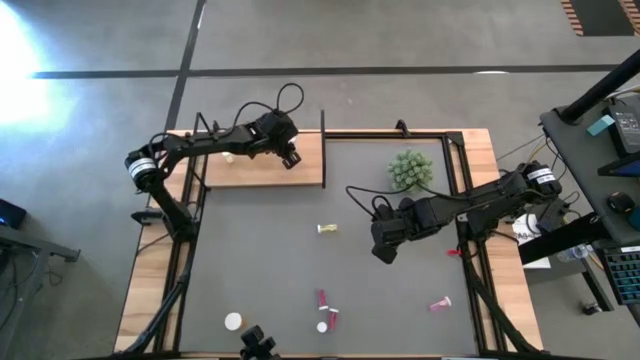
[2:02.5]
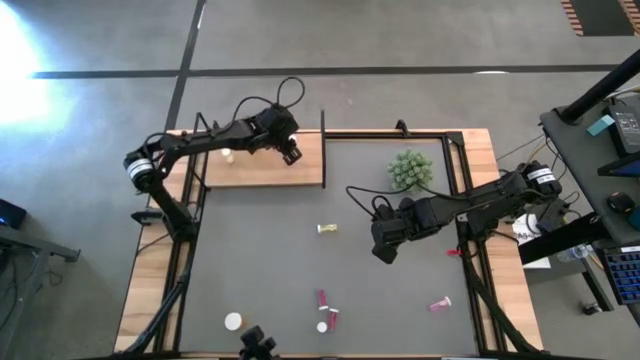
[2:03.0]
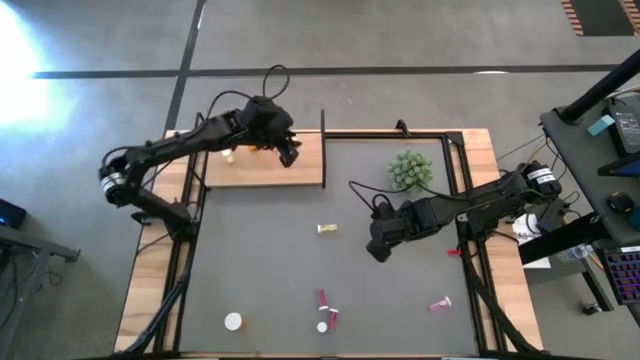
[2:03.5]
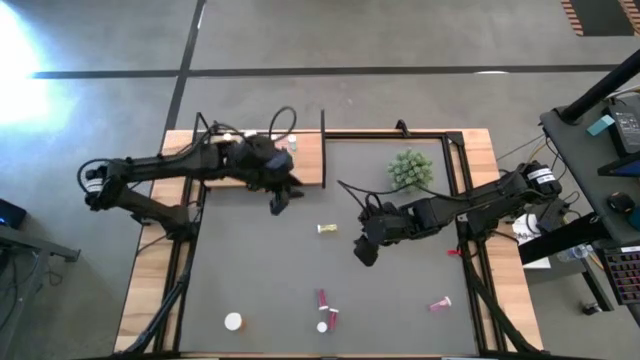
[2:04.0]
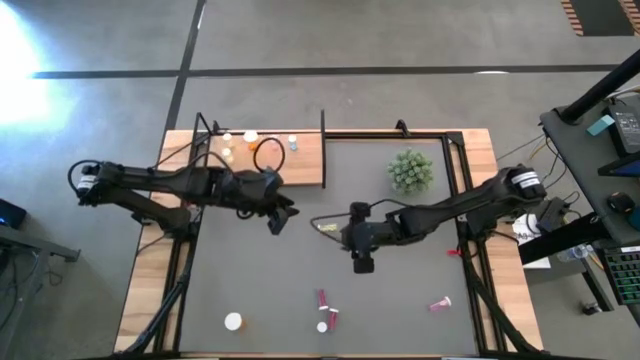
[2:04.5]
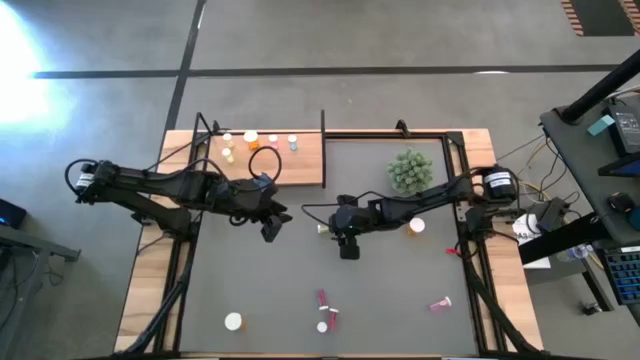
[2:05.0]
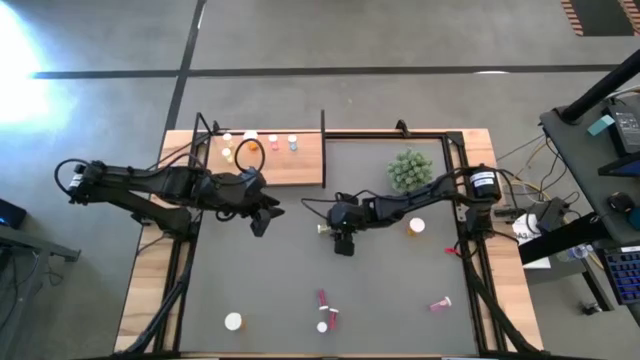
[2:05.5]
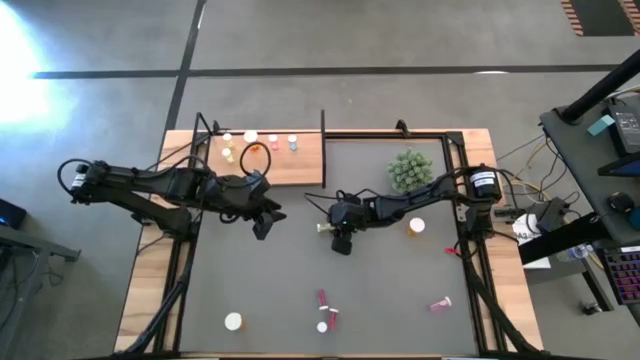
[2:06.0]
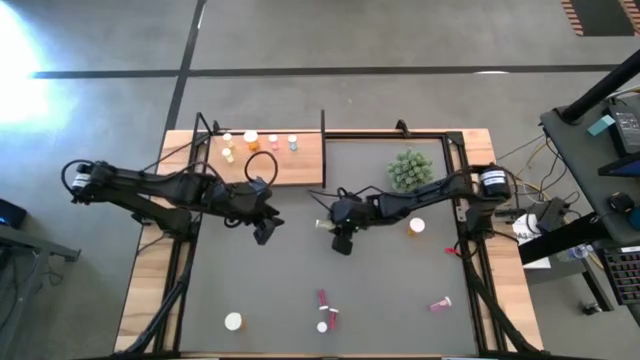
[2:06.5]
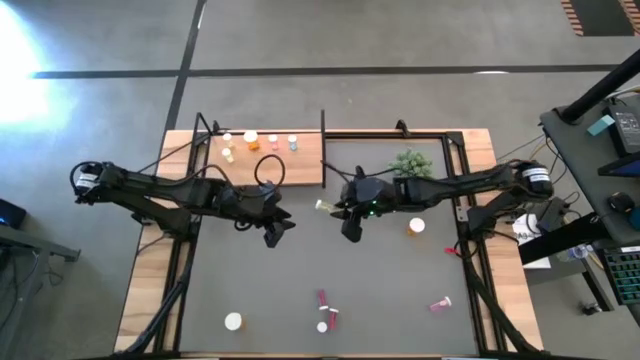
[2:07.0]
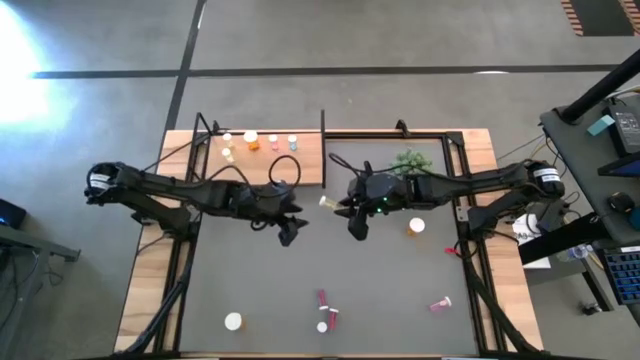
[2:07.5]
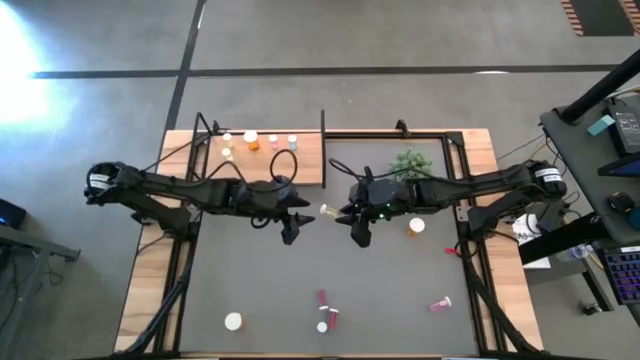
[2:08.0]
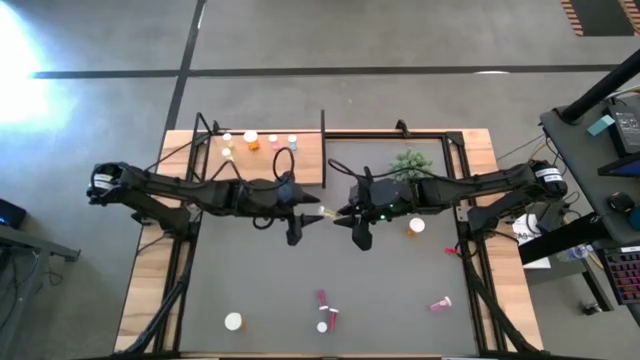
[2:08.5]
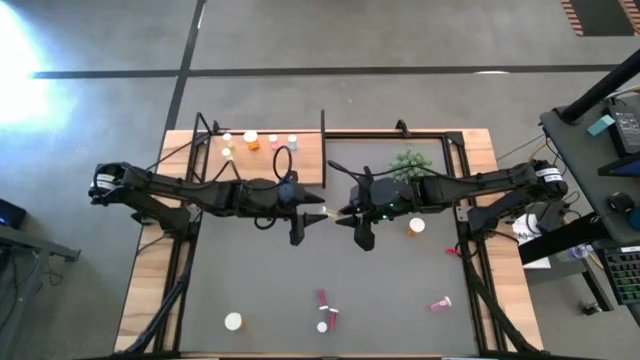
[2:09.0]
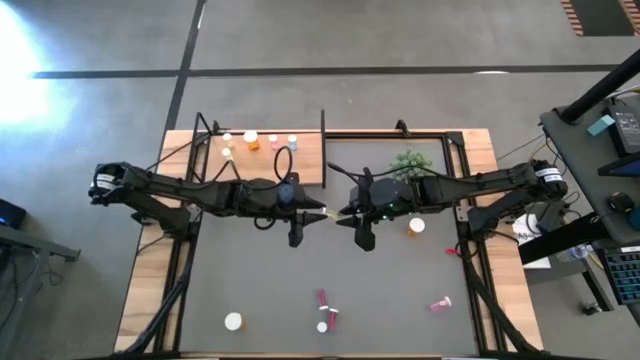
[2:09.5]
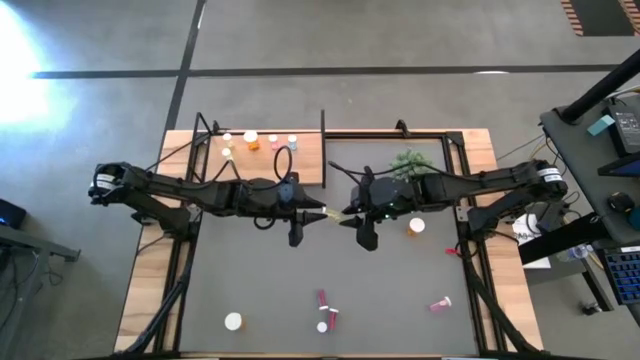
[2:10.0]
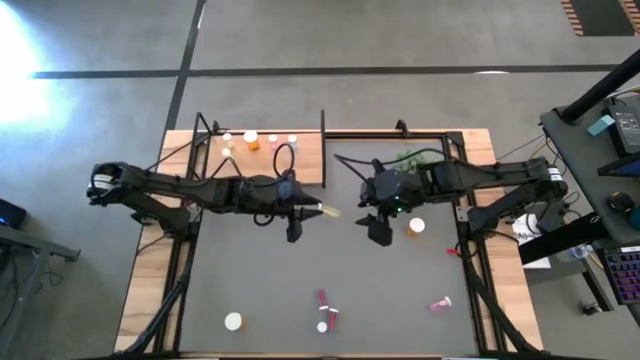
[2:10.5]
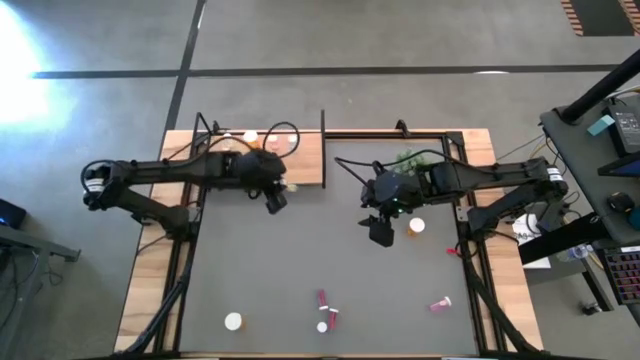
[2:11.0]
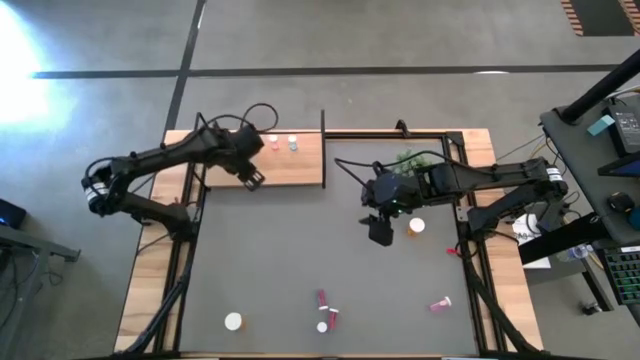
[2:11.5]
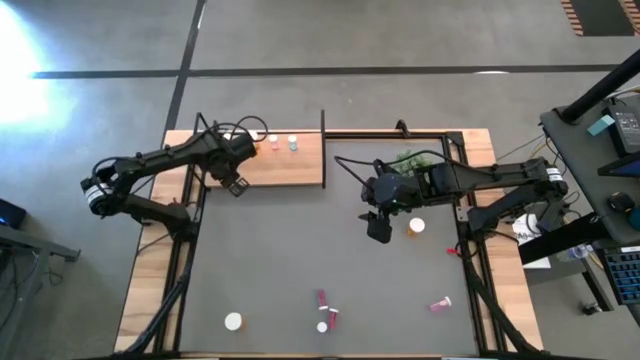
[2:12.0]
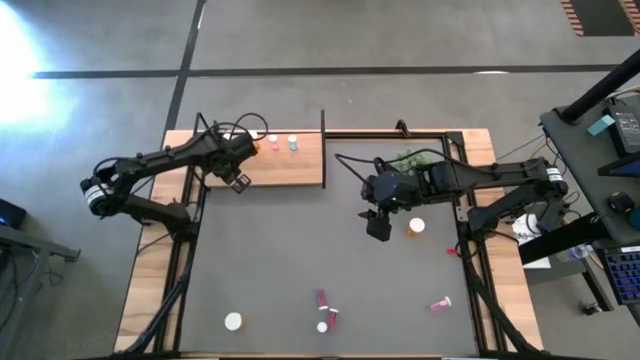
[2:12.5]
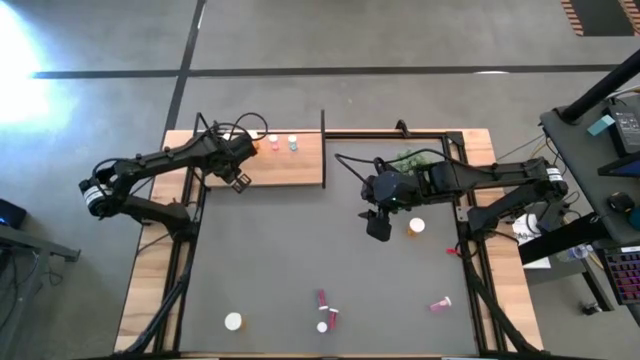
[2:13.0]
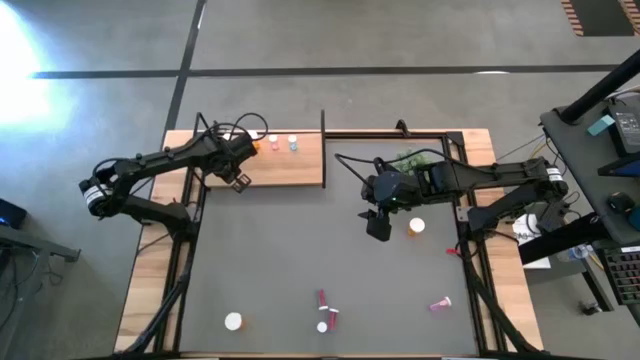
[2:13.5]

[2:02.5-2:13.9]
Task: Pick and place medicine bottles onto shelf by color
Put the yellow pill bottle on the shelf aligned with the other yellow pill bottles

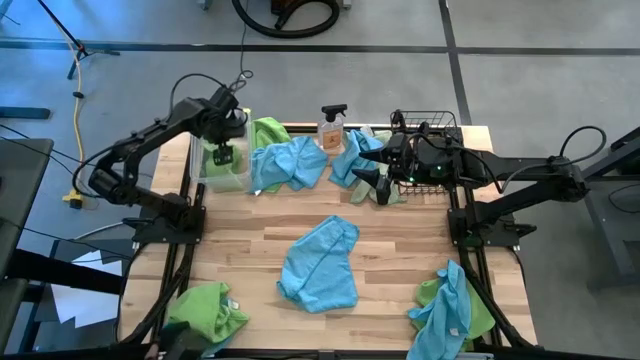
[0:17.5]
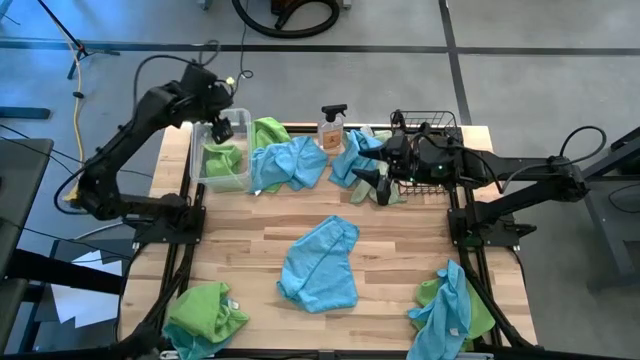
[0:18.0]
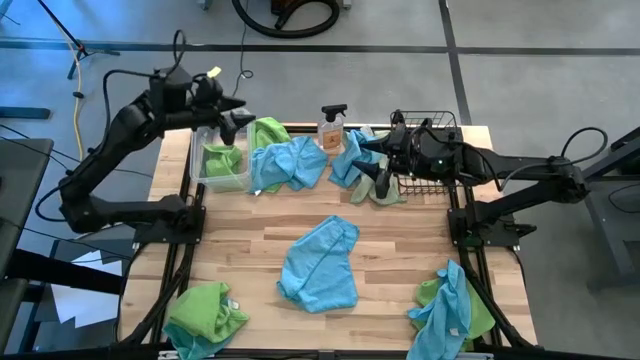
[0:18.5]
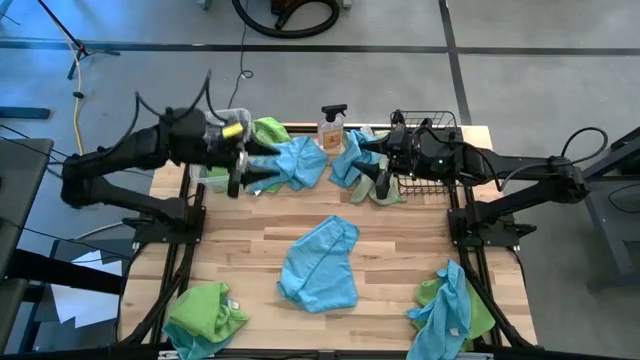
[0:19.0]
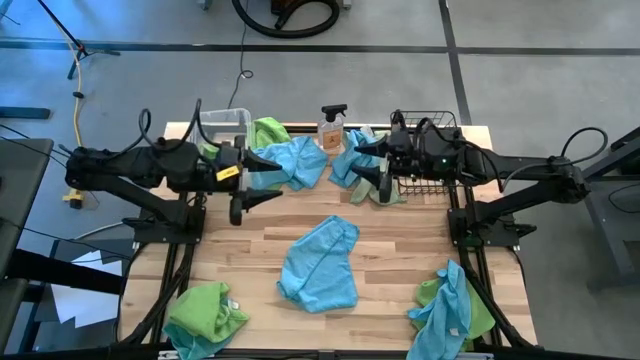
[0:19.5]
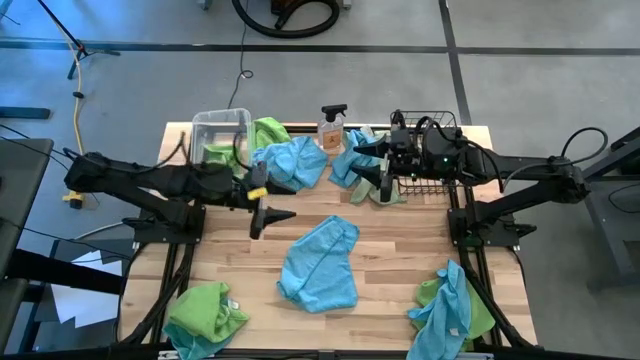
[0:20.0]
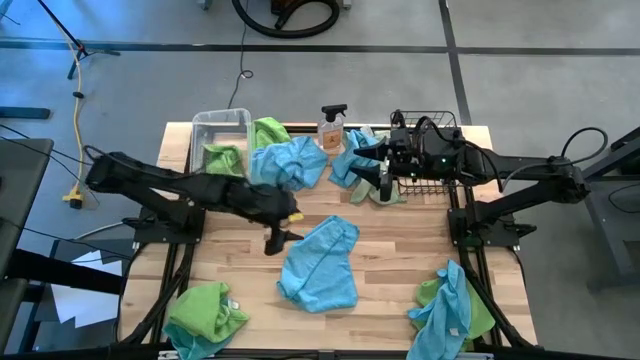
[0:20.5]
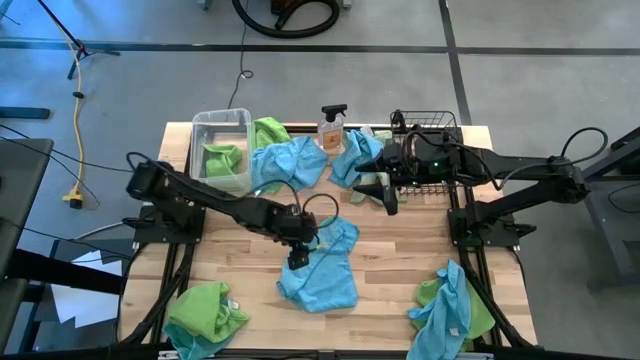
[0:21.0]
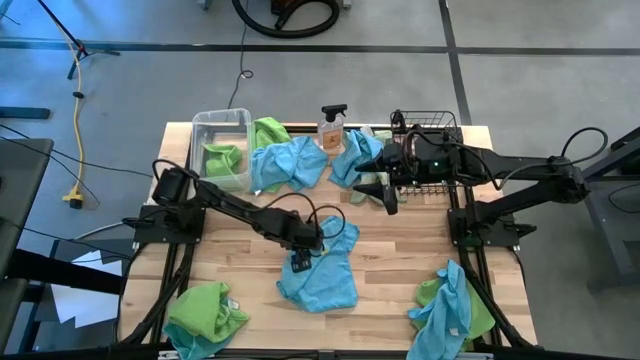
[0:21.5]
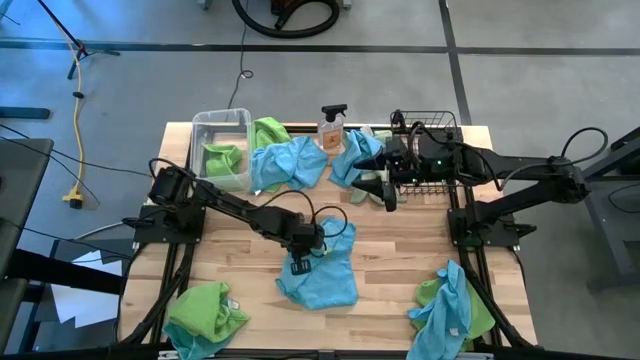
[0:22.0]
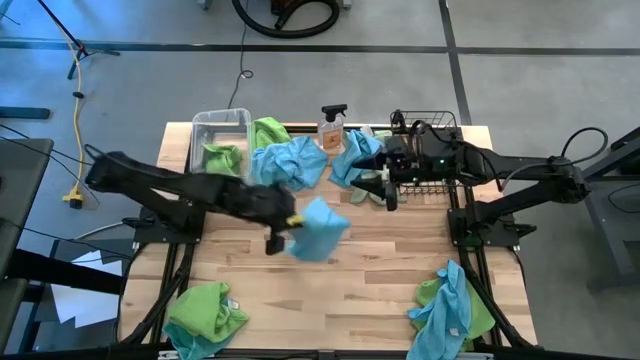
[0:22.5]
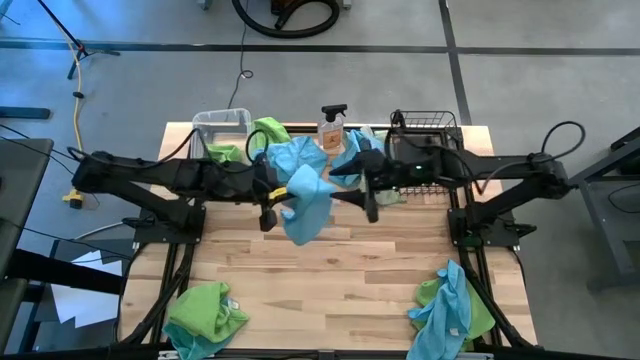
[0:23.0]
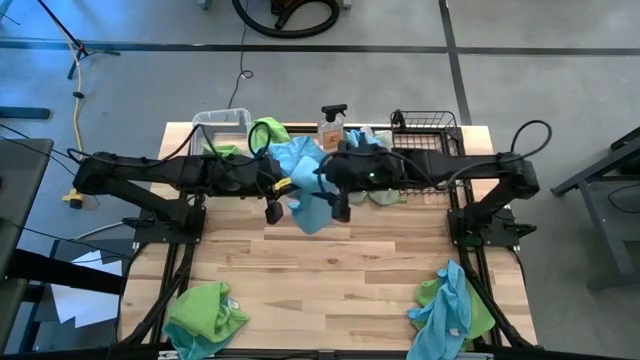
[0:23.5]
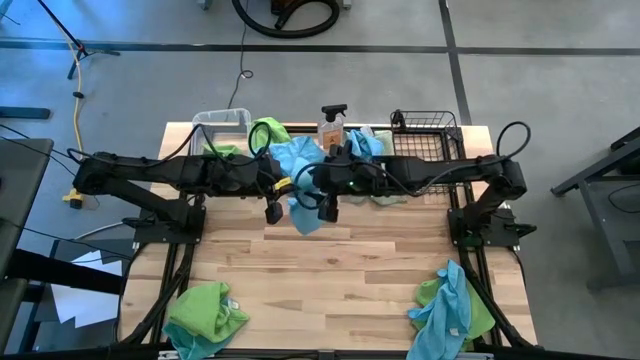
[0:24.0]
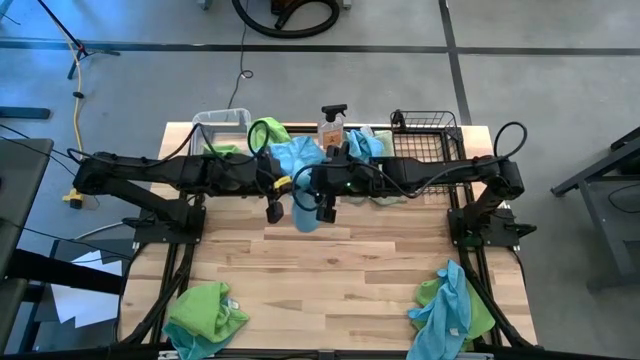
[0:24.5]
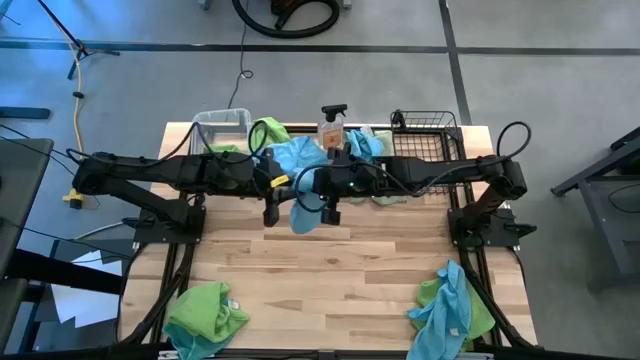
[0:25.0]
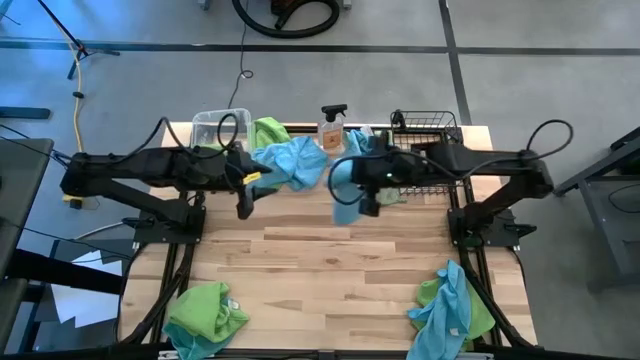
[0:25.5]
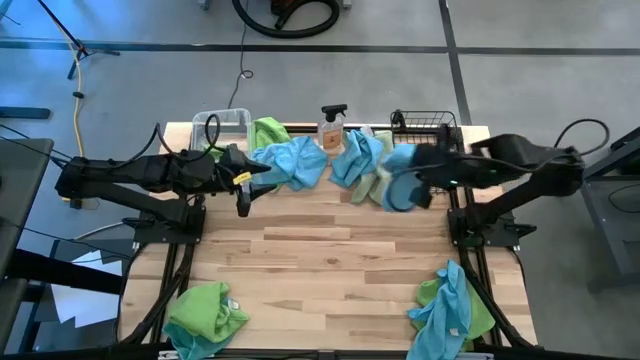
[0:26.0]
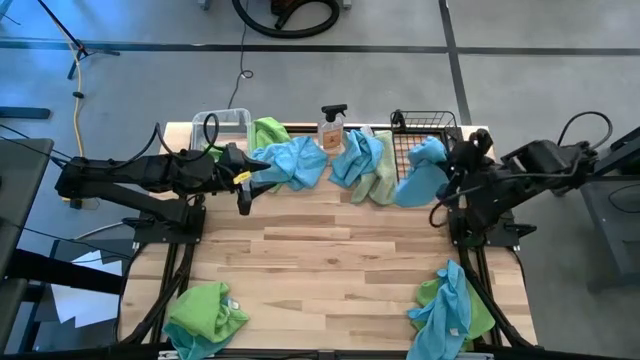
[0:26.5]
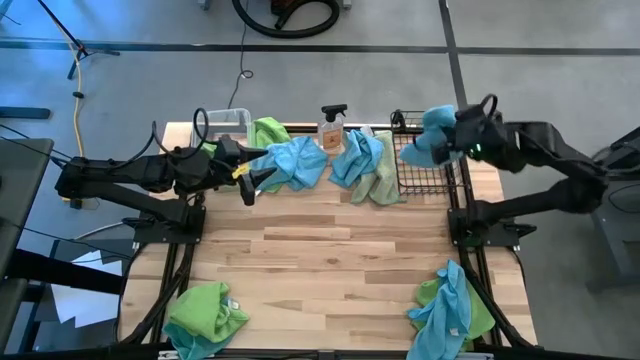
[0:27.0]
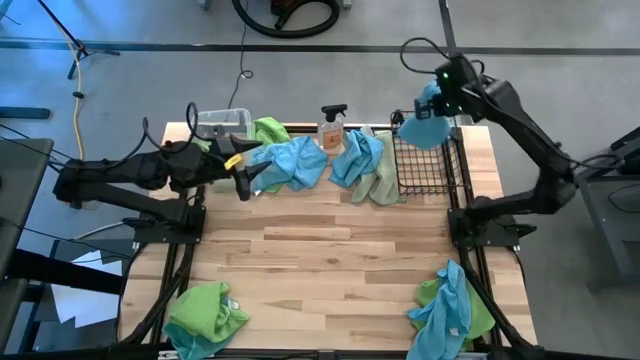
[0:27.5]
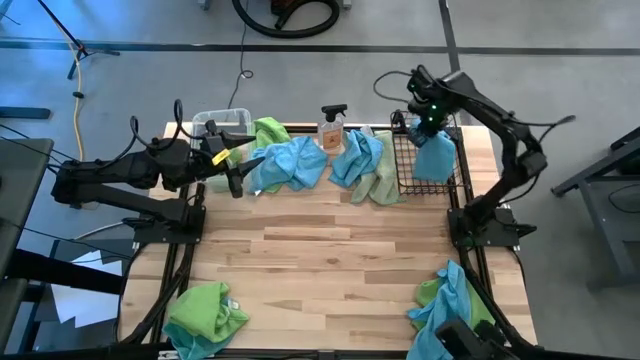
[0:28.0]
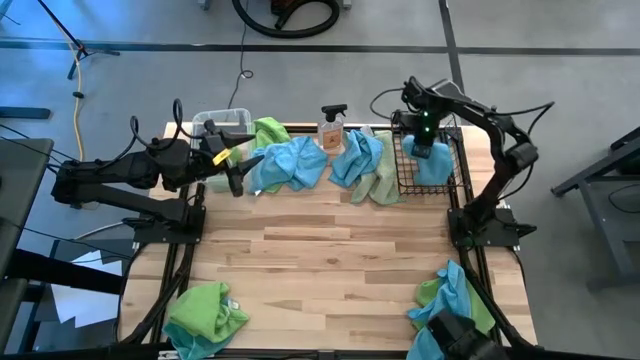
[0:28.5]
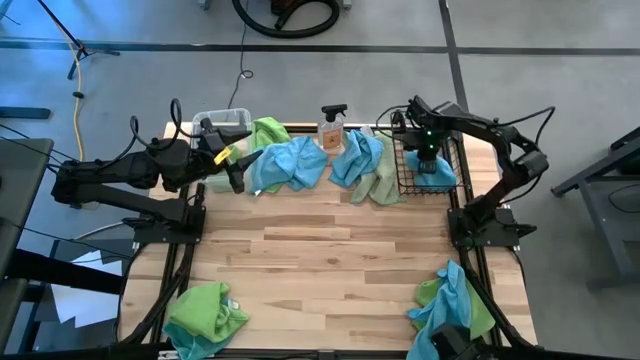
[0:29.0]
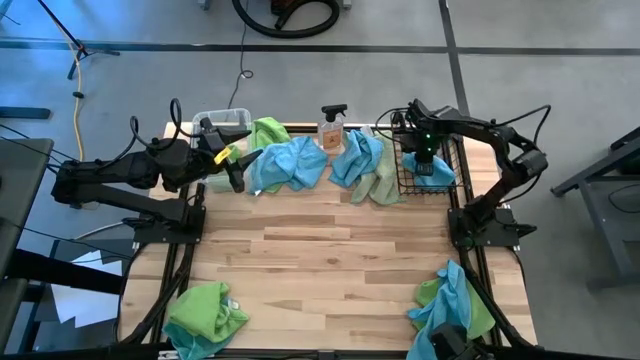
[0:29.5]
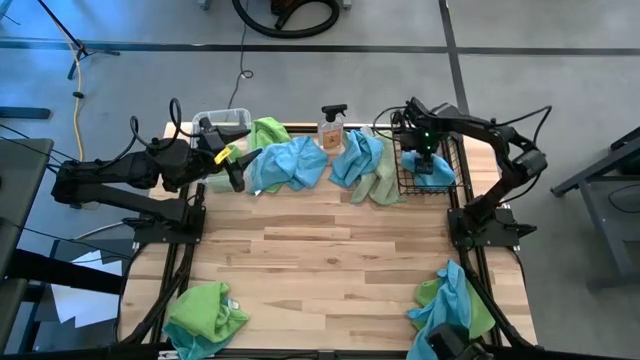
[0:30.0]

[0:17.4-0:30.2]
Task: Sort microfiber towel by color & place in baskets
Put the blue microfiber cloth into the basket
